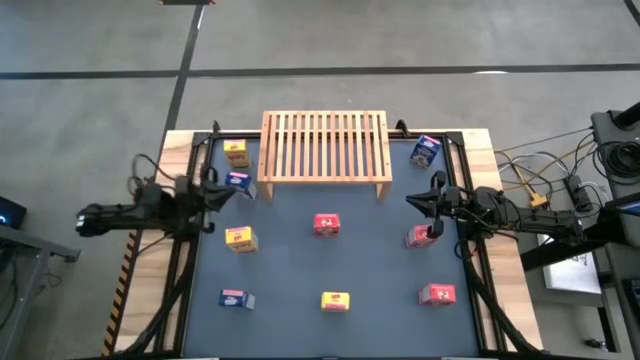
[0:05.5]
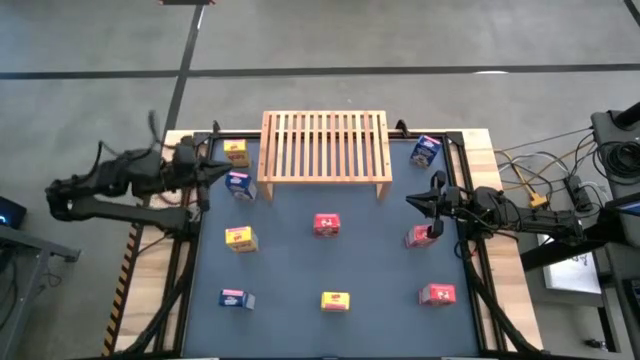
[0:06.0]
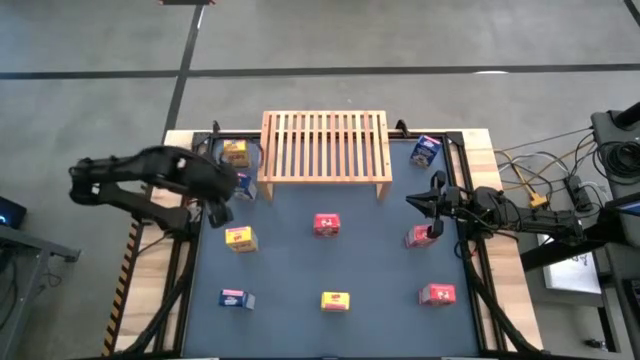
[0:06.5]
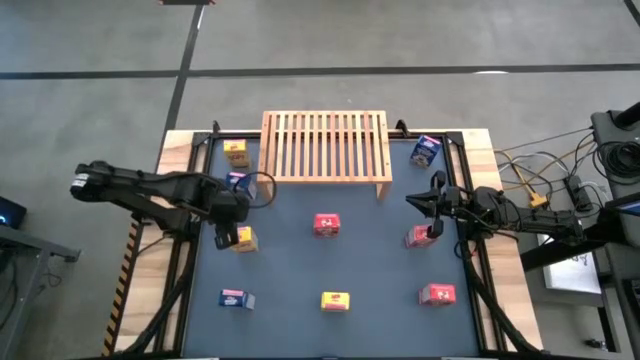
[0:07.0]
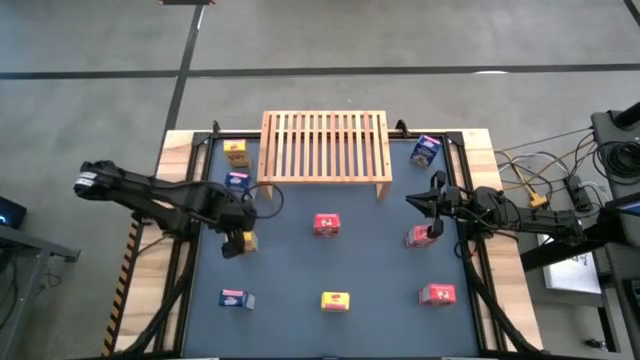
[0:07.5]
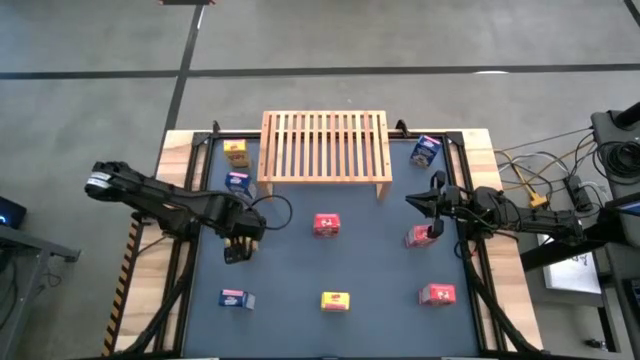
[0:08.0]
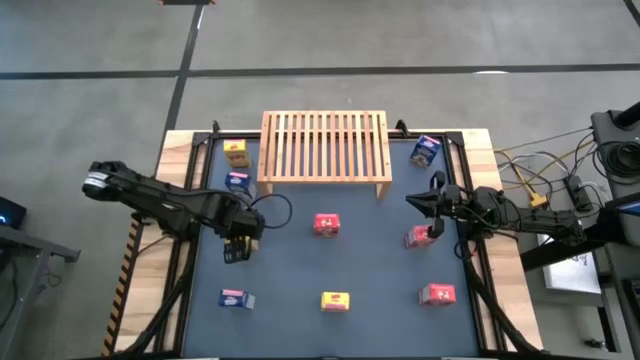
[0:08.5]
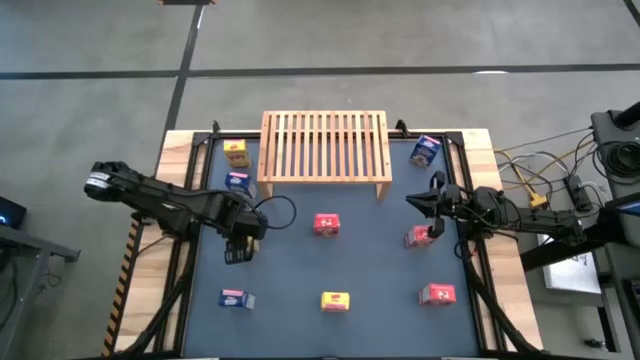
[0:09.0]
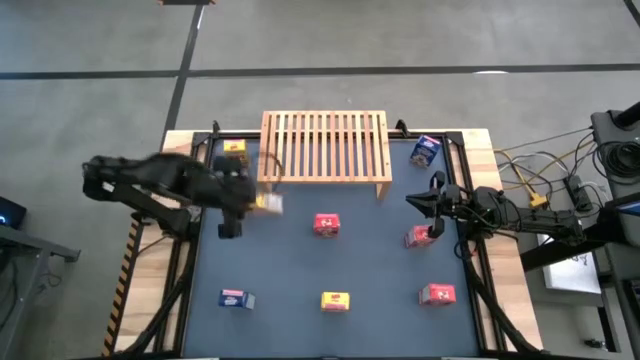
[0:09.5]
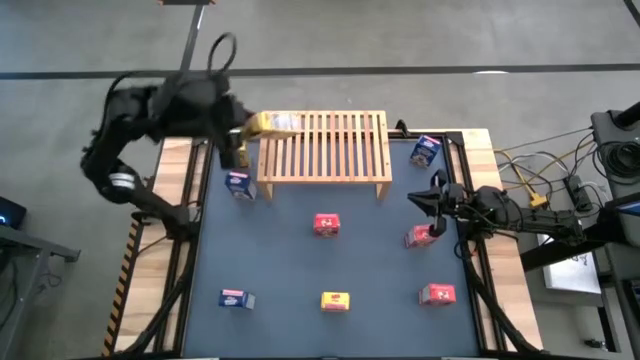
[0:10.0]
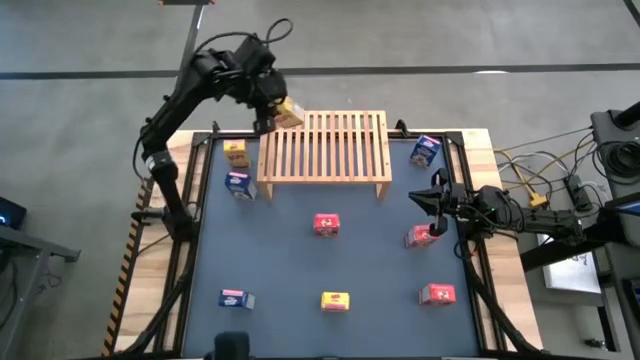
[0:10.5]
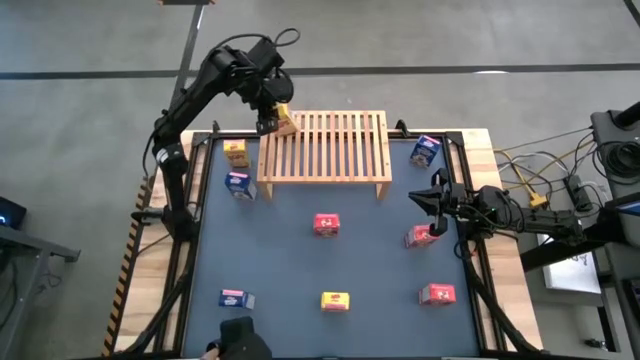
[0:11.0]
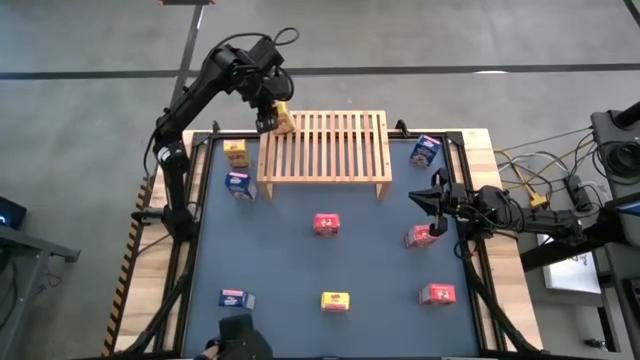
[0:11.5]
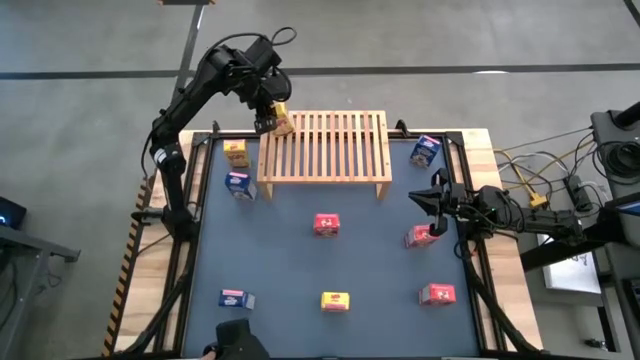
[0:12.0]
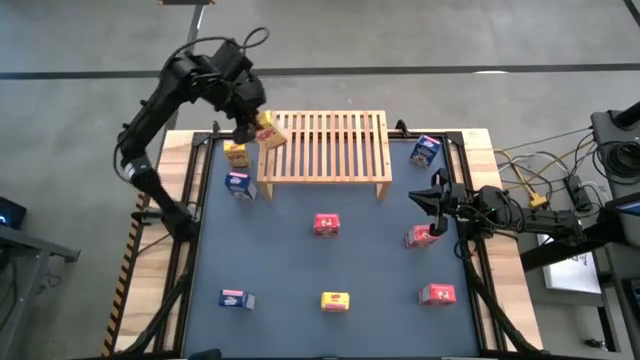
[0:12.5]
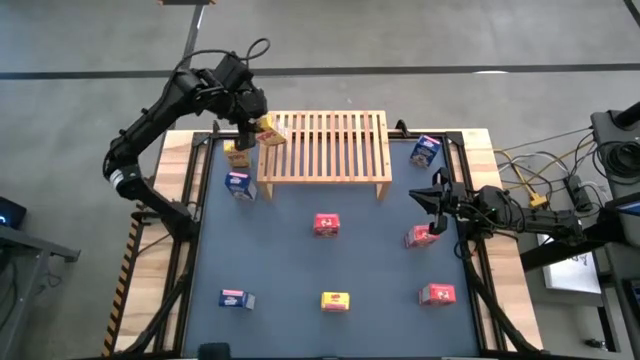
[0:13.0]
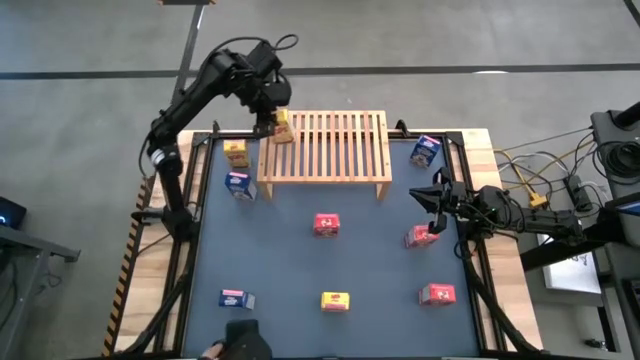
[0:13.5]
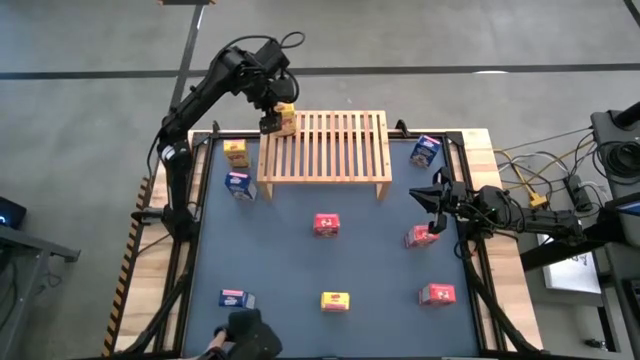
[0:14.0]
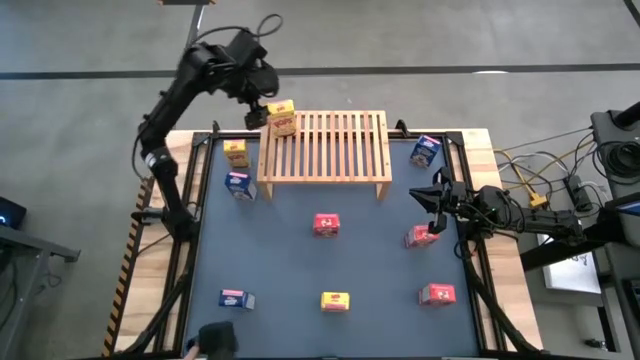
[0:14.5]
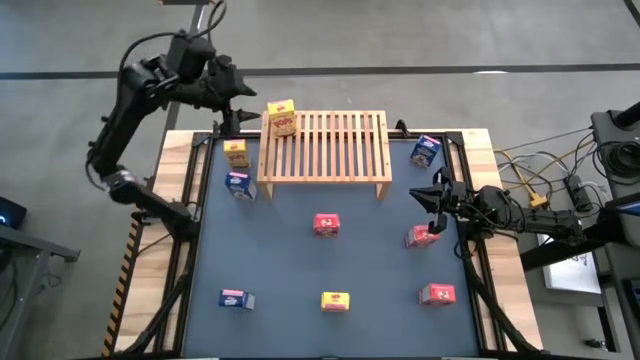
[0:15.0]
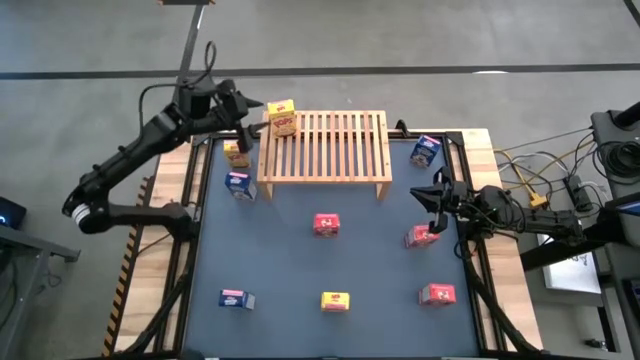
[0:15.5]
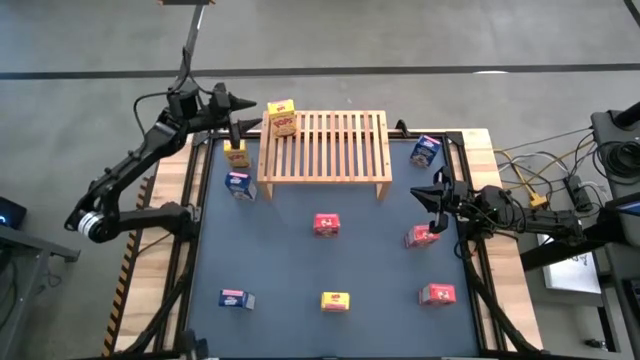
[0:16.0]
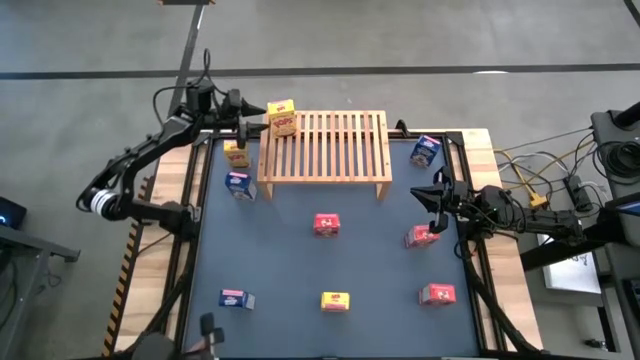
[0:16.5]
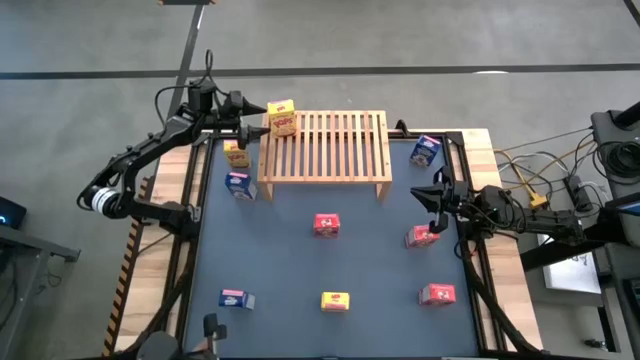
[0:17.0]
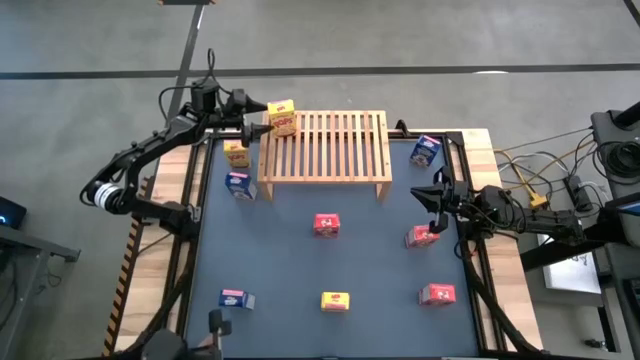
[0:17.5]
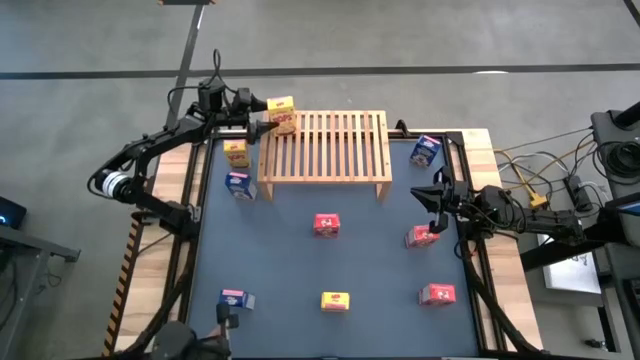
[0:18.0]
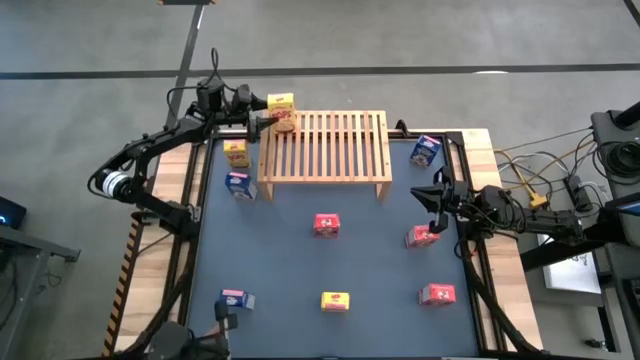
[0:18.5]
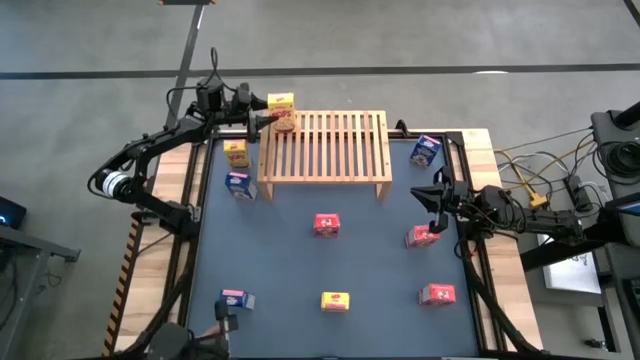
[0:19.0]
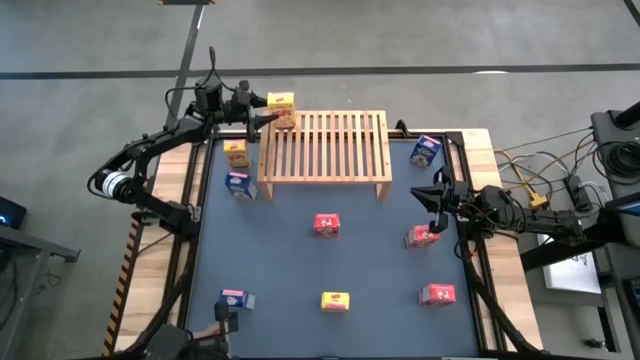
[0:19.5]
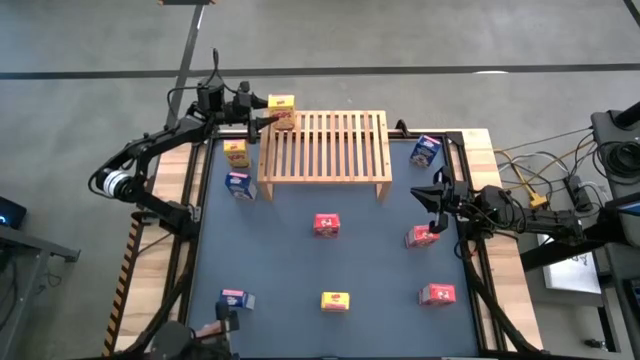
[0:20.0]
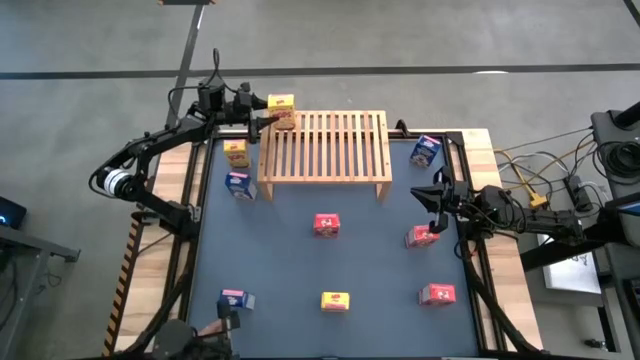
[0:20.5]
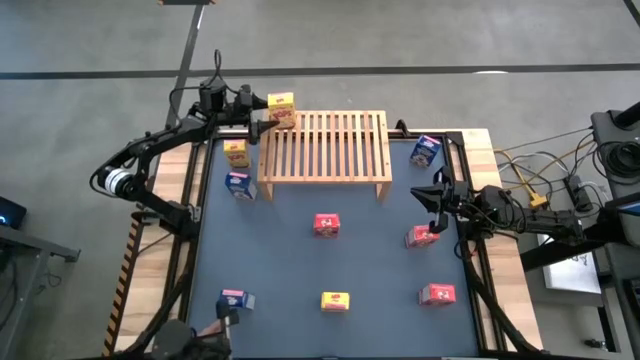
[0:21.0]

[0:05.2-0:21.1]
Task: Stack cereal on shelf
Put the left yellow cereal box on the shelf

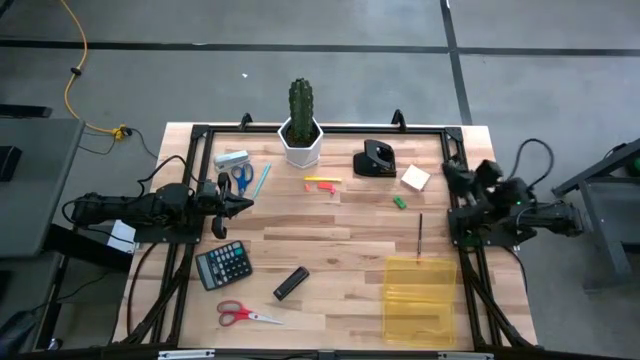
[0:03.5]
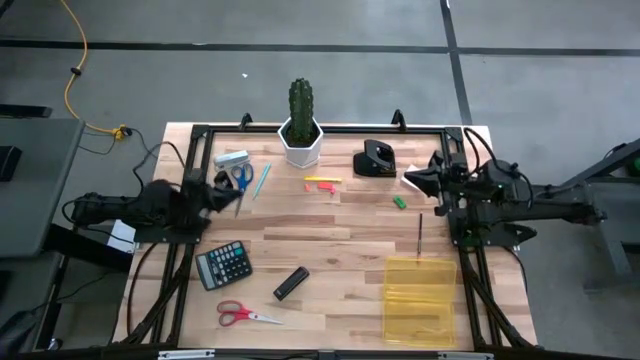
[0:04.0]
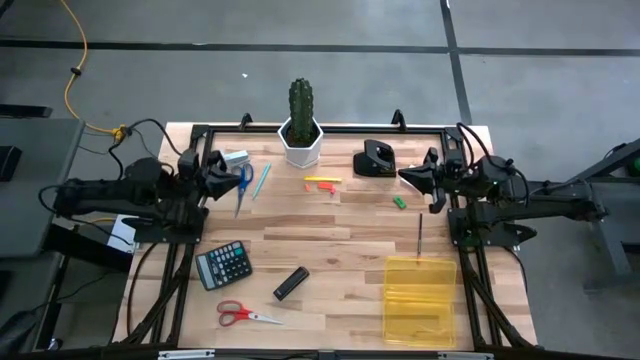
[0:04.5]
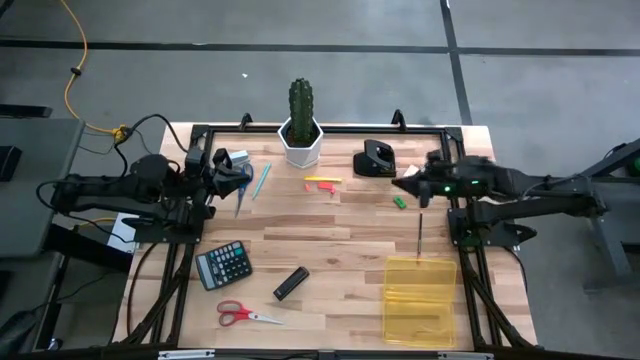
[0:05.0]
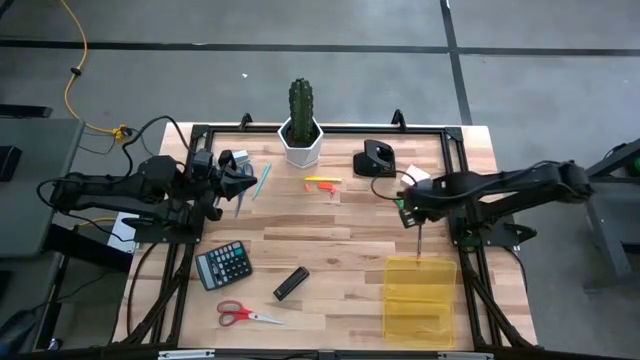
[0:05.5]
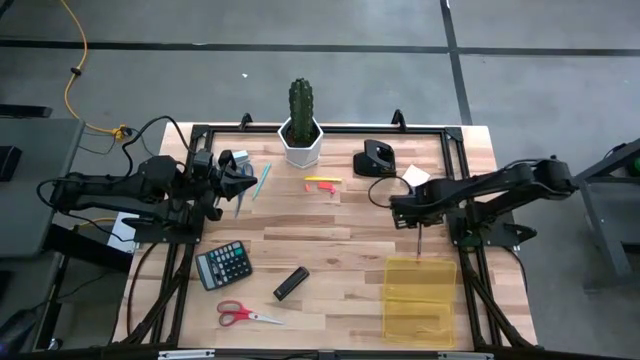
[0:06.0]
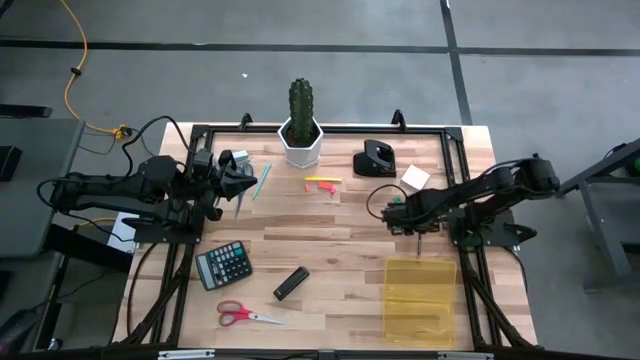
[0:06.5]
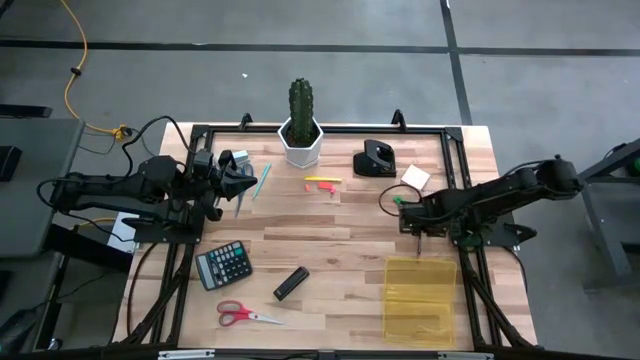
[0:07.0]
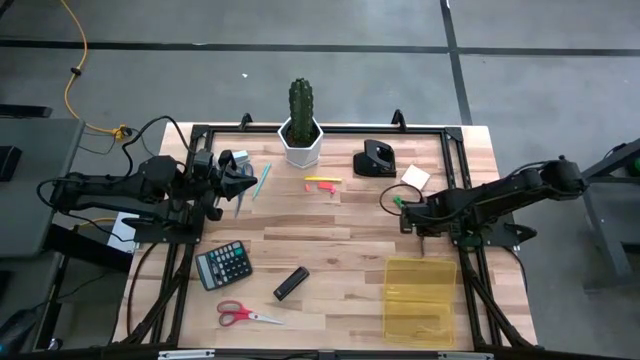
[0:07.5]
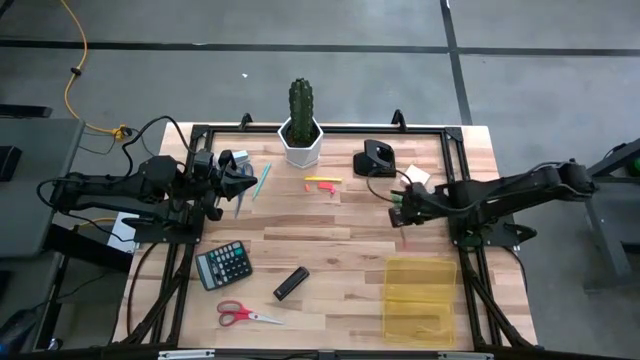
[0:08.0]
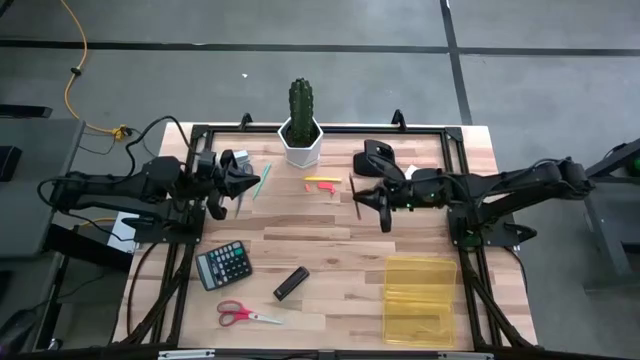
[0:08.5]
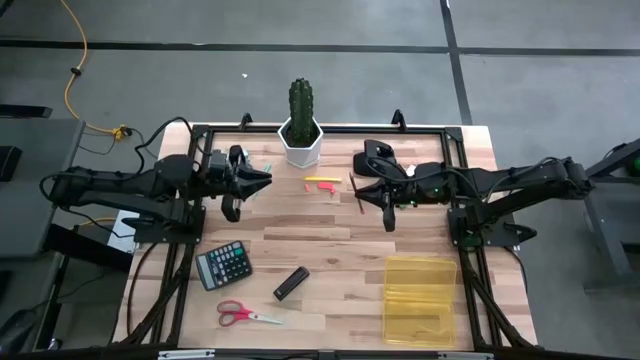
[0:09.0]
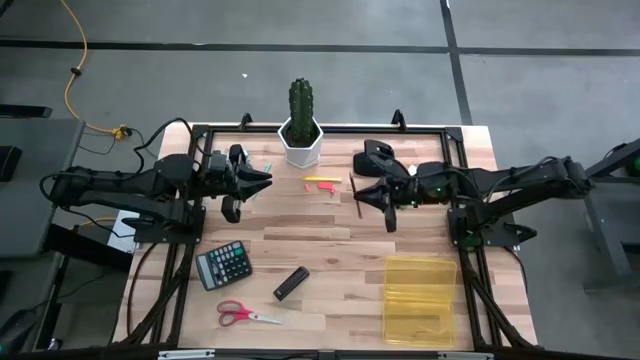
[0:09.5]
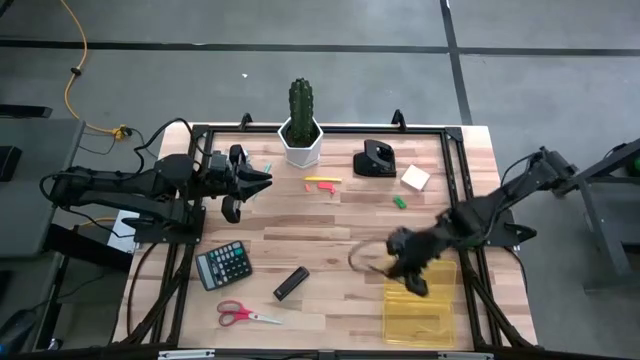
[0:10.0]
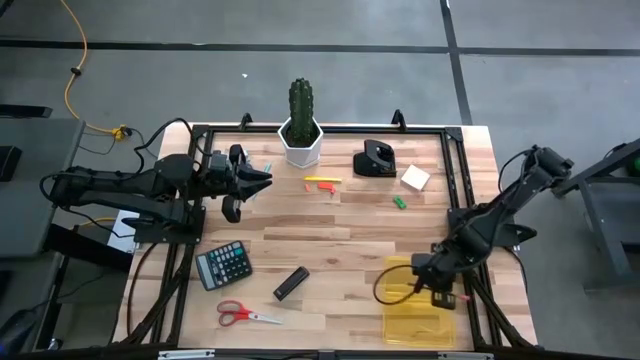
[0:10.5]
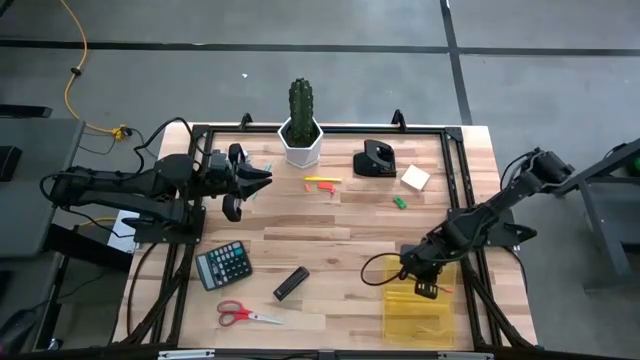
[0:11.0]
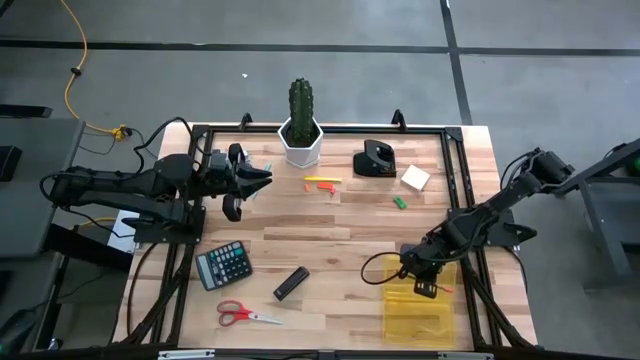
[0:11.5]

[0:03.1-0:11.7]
Task: Pack school essentials
Put the black pencil on the yellow supply box
